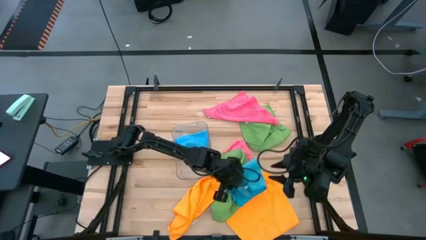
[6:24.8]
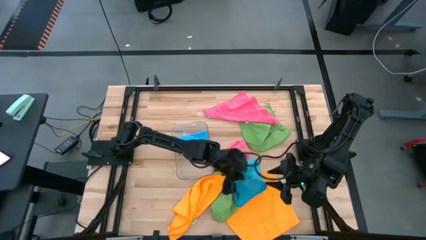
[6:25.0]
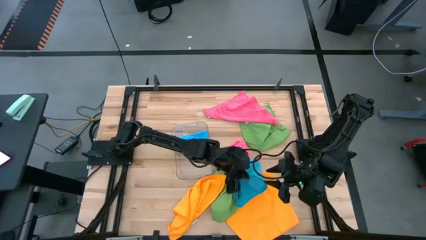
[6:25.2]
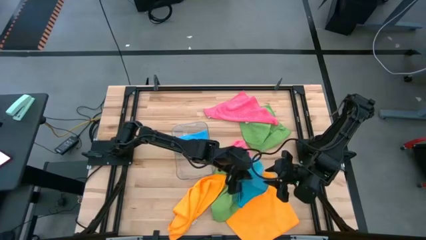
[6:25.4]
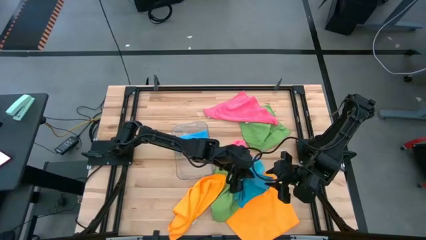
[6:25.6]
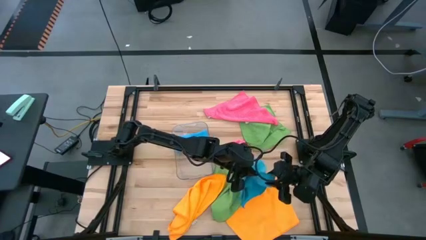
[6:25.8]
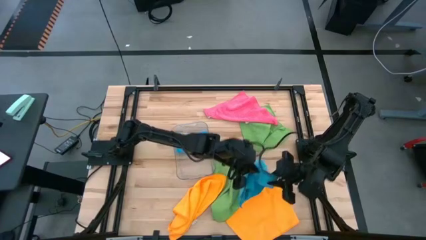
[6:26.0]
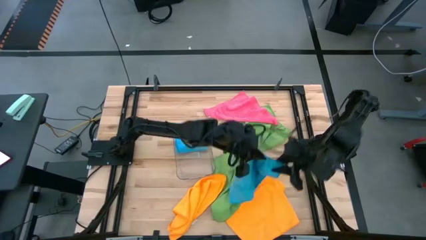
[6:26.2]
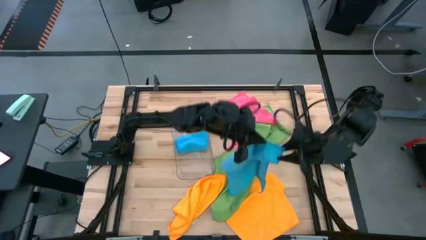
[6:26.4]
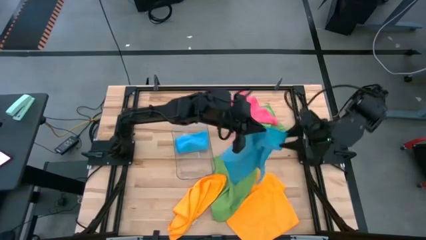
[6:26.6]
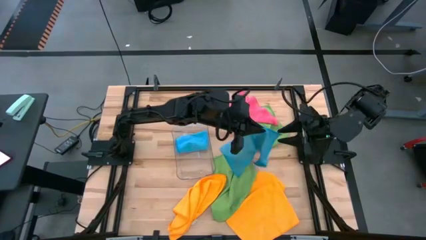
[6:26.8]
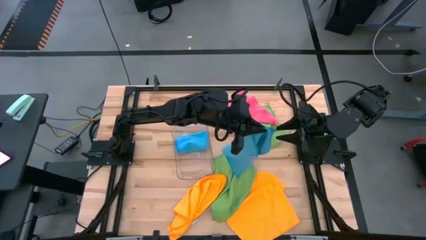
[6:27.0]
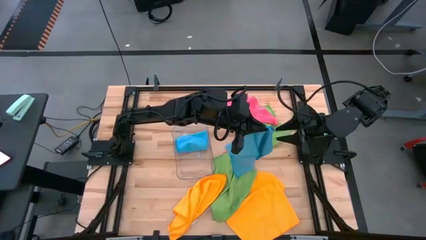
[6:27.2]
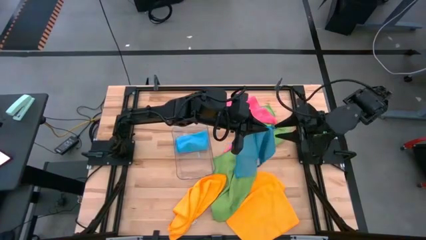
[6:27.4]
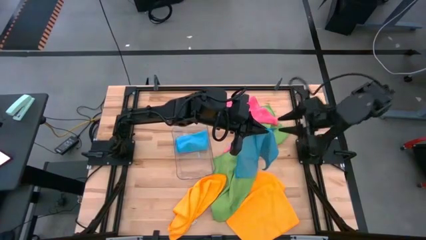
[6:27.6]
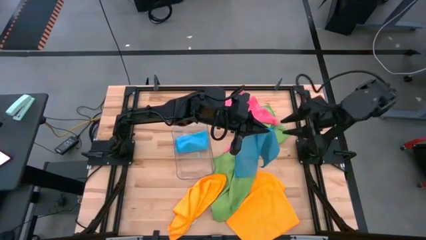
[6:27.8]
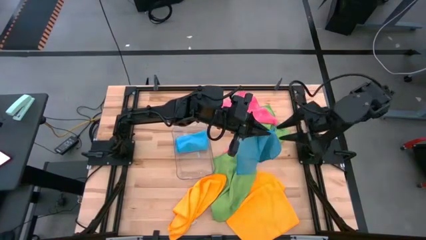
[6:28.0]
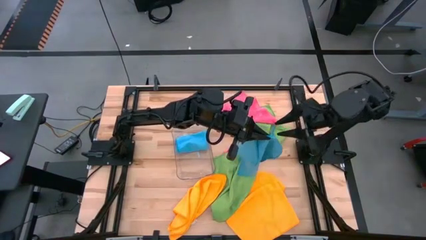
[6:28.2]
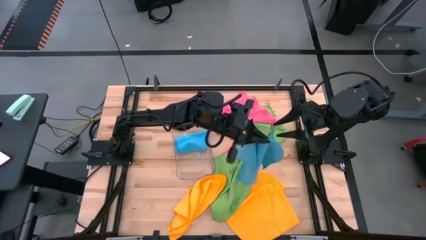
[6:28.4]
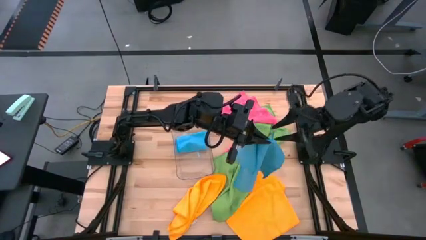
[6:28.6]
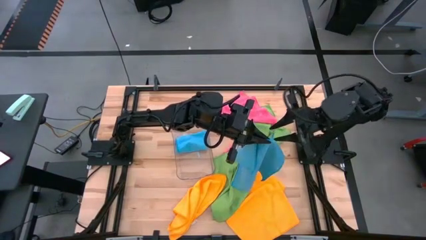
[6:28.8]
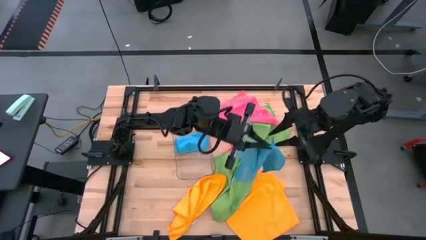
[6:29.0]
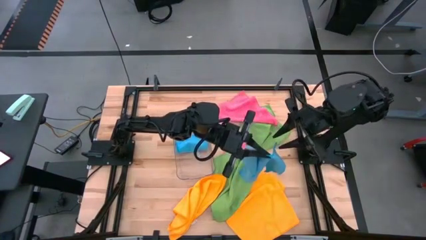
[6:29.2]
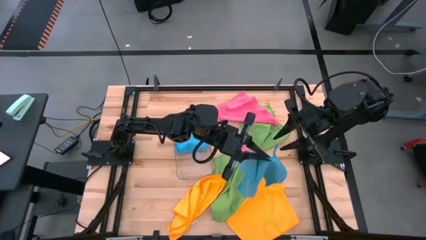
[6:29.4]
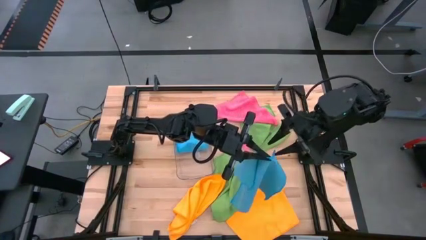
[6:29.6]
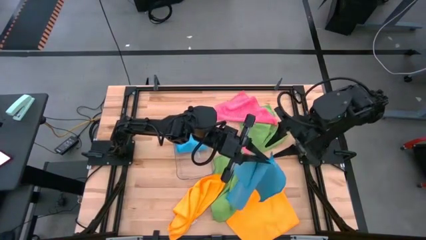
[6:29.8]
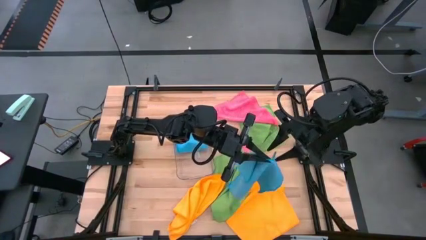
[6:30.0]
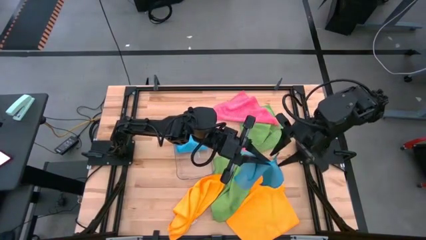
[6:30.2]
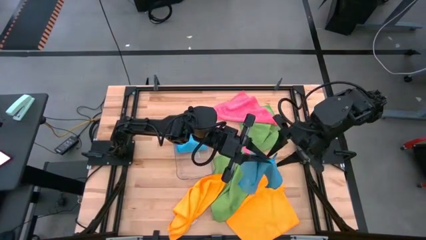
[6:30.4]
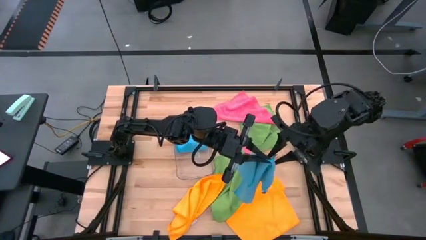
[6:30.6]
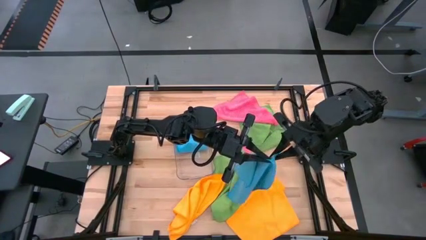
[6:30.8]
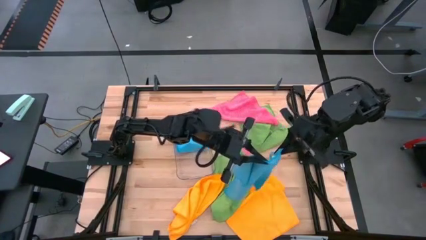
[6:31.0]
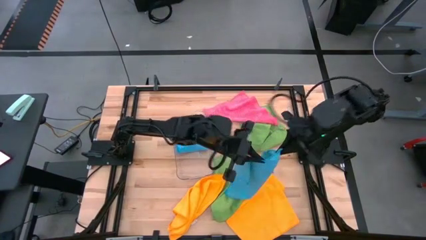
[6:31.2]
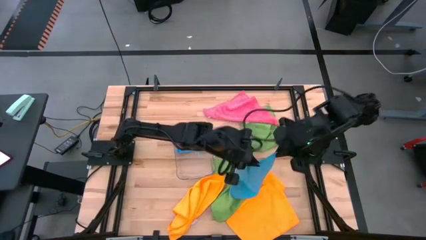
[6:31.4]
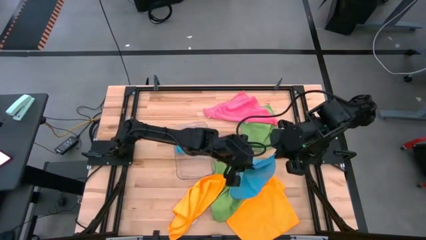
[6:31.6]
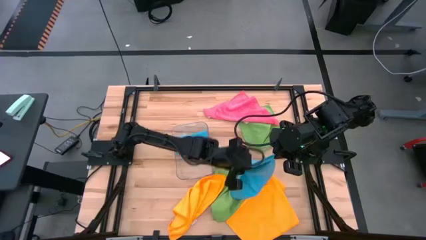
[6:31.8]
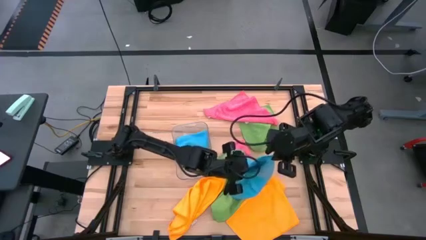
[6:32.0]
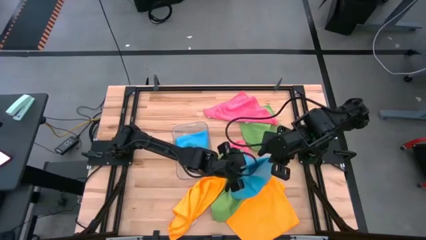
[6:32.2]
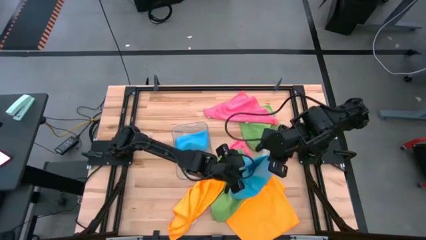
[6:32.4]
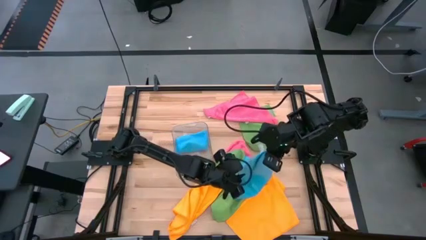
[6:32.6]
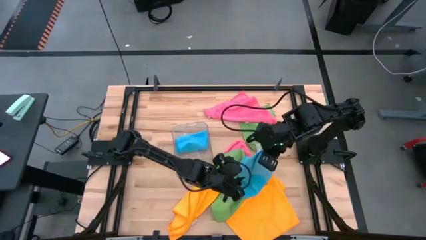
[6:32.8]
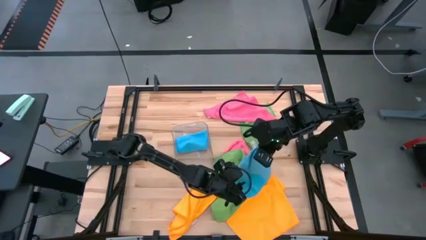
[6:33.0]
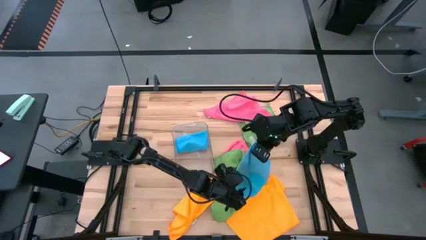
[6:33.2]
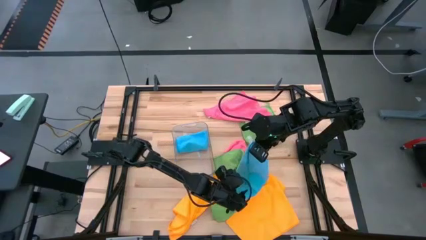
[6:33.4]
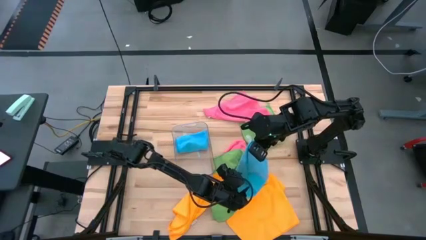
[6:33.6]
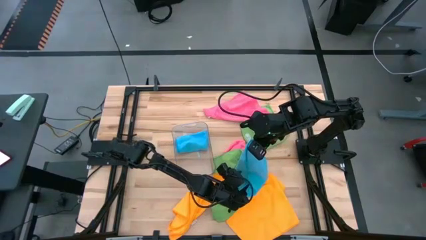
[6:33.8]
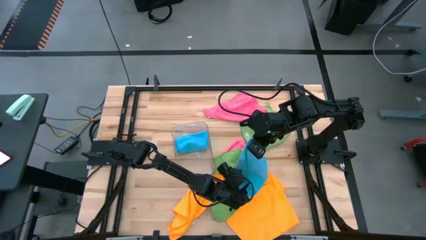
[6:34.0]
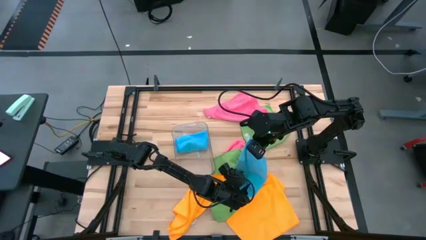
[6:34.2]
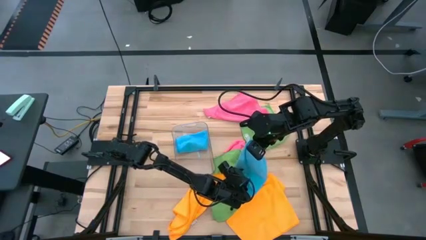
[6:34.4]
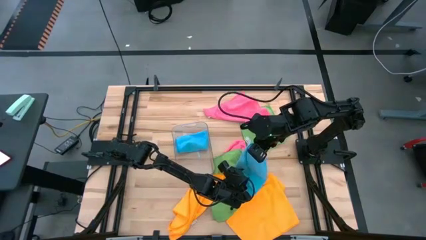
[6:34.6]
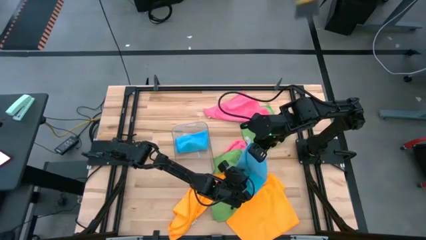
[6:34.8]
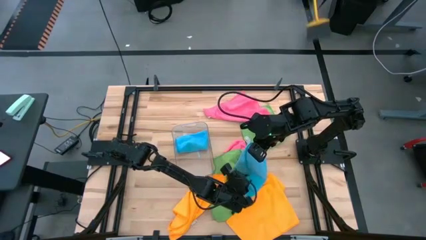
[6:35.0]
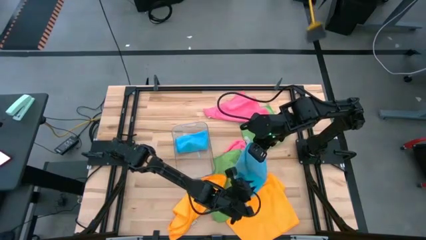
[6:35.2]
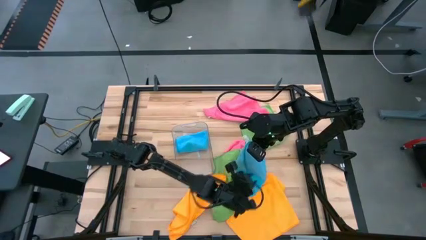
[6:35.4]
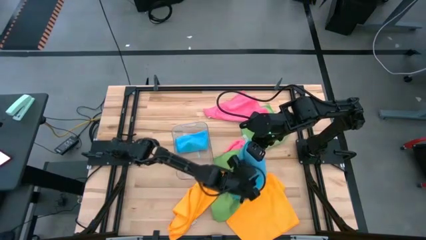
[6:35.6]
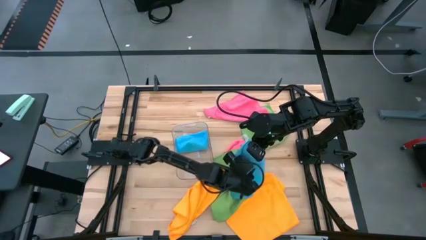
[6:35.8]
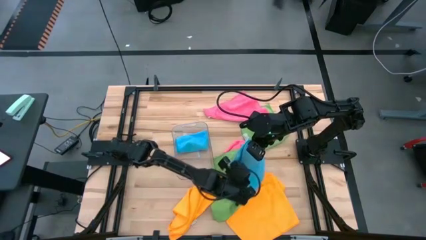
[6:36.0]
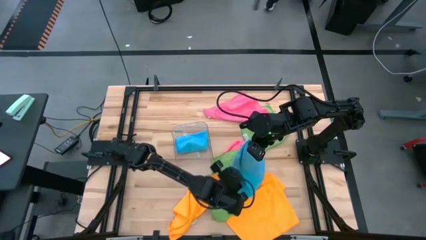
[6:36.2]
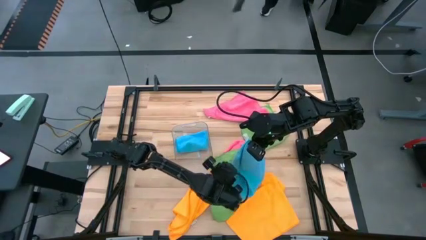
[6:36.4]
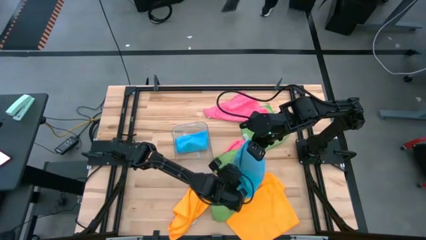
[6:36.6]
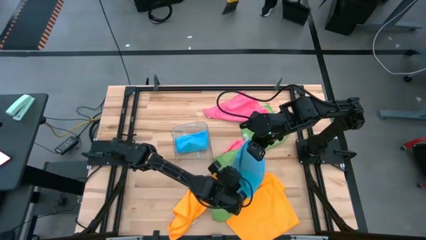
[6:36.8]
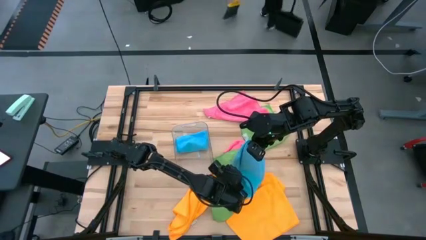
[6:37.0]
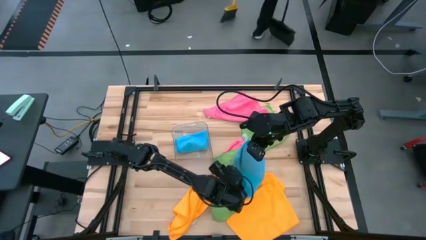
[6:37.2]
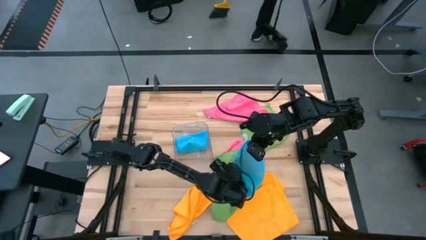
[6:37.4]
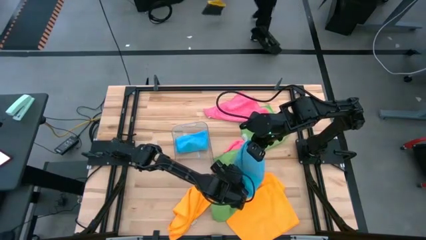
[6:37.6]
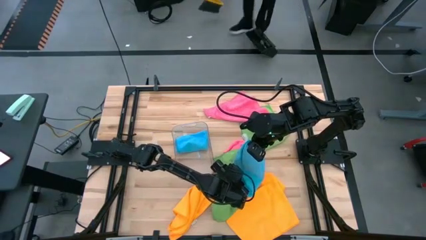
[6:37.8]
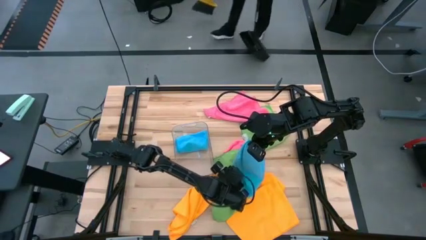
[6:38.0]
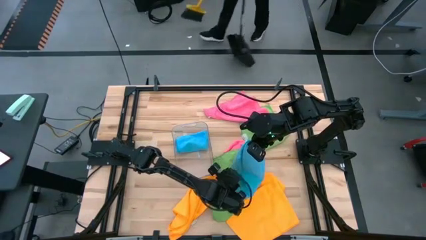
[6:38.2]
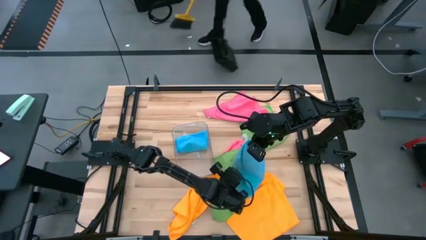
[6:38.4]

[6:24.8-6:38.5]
Task: Fold microfiber towels
Fold the blue towel

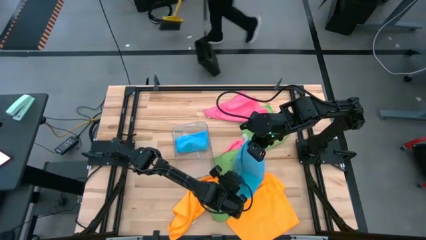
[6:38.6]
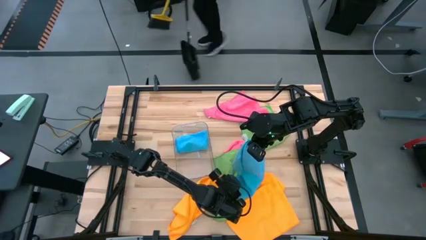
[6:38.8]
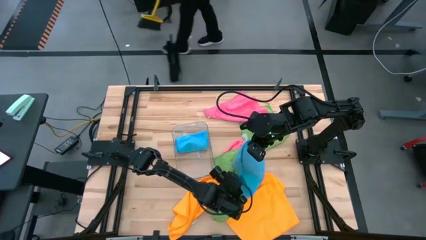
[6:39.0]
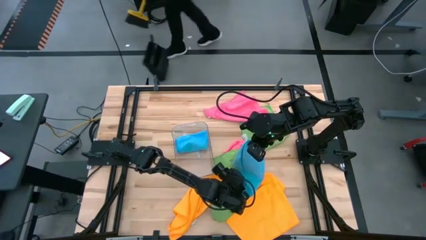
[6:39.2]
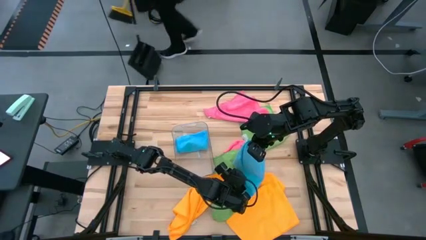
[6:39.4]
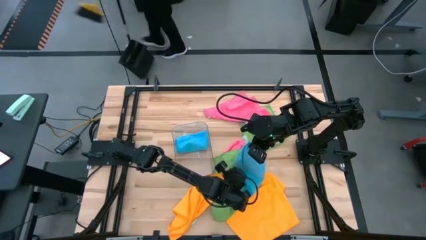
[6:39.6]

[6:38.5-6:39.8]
Fold the blue towel
